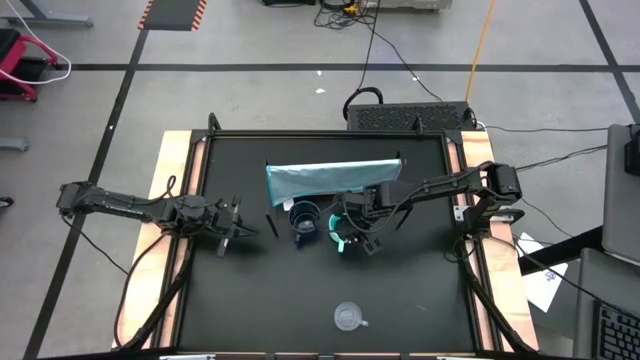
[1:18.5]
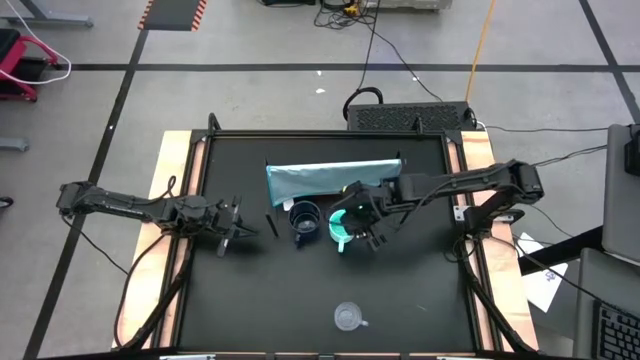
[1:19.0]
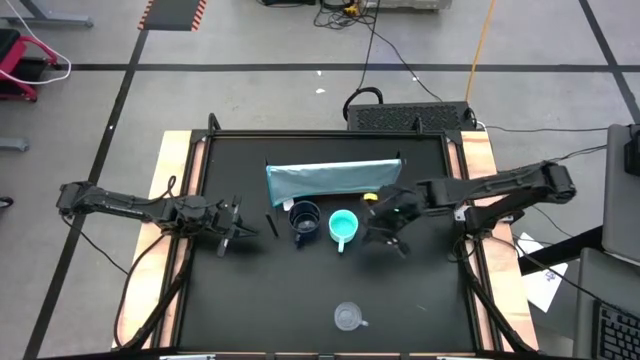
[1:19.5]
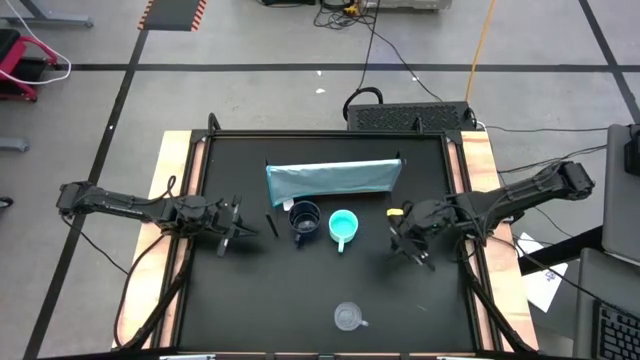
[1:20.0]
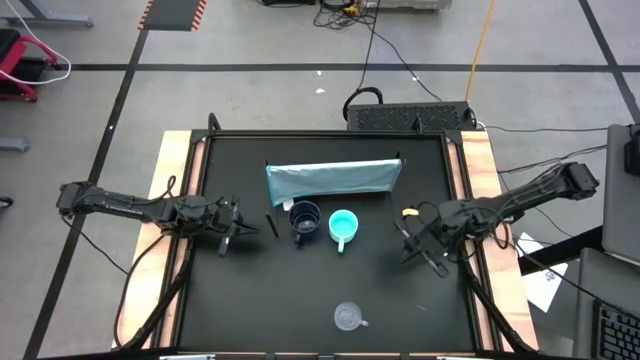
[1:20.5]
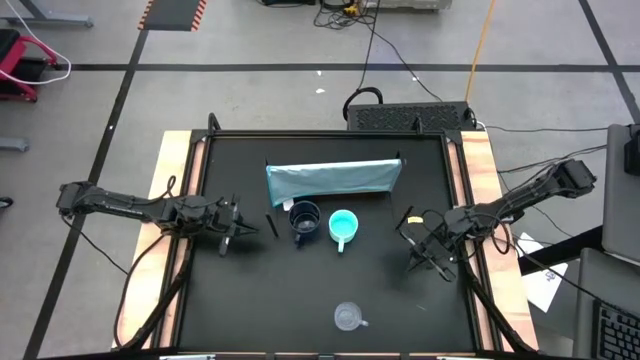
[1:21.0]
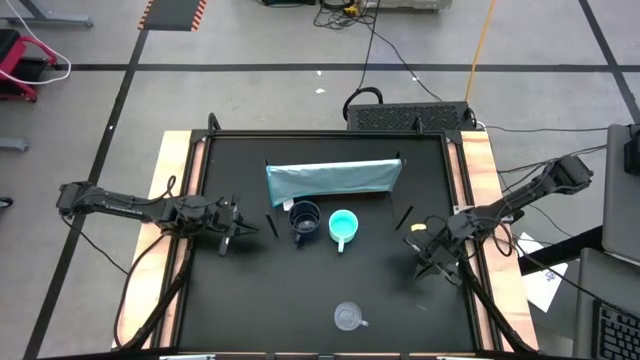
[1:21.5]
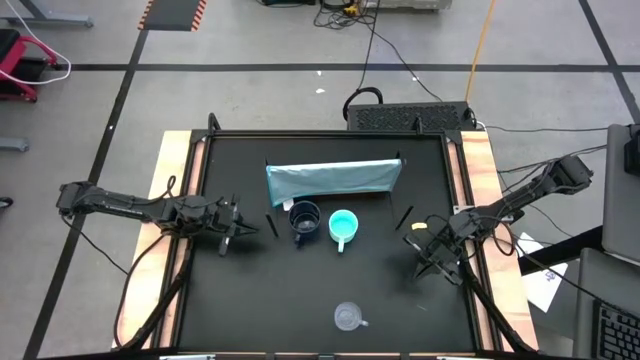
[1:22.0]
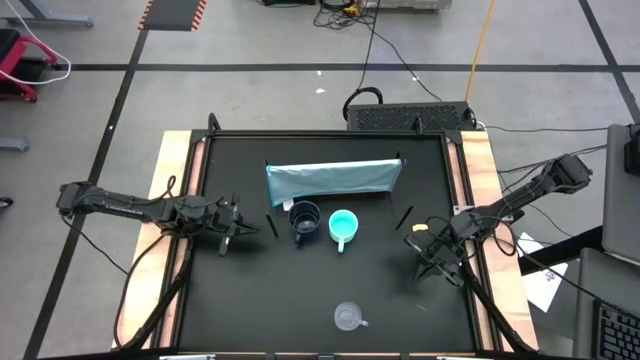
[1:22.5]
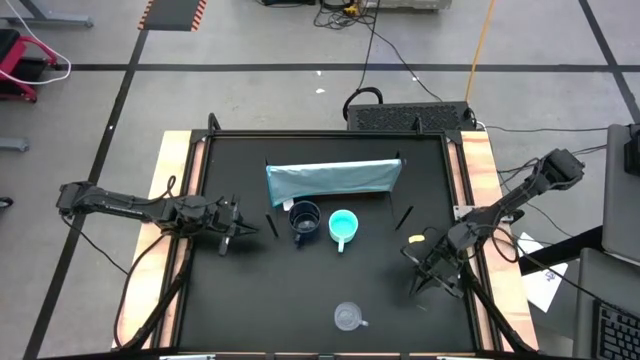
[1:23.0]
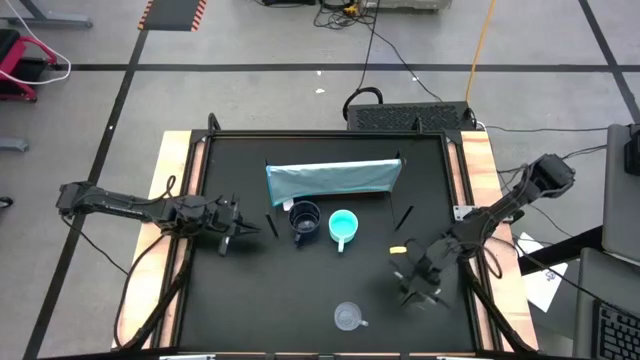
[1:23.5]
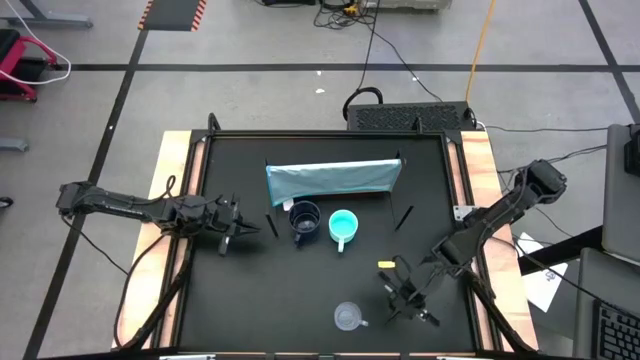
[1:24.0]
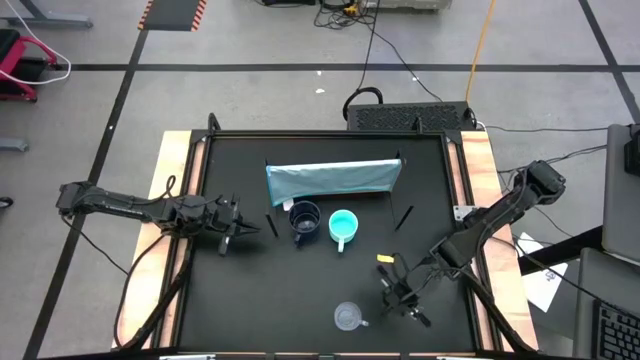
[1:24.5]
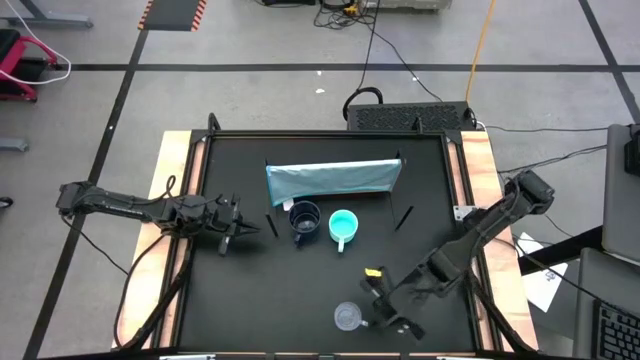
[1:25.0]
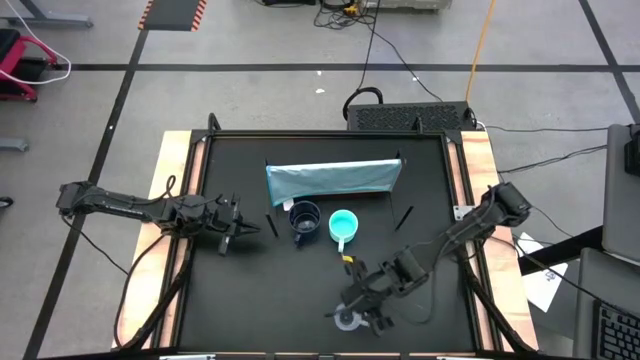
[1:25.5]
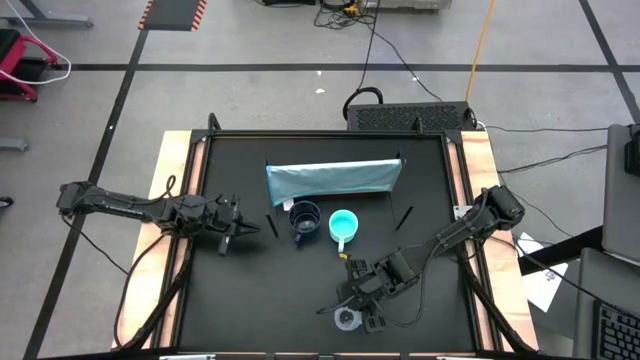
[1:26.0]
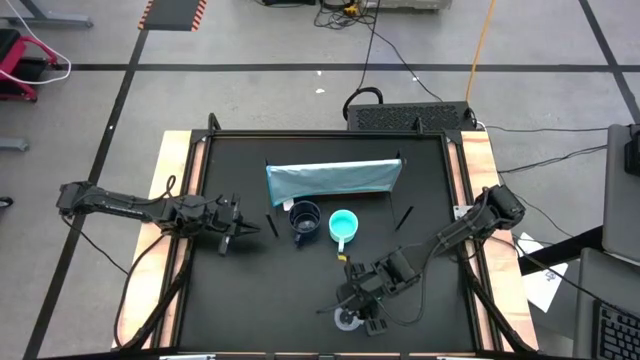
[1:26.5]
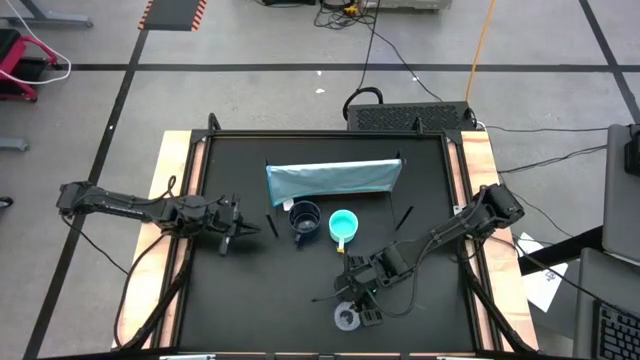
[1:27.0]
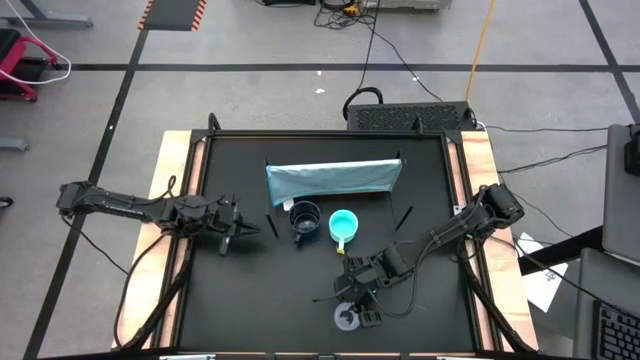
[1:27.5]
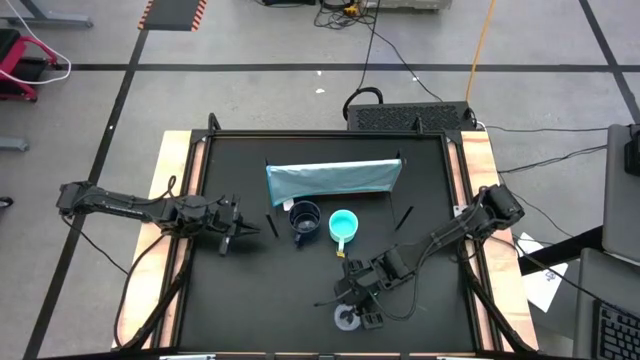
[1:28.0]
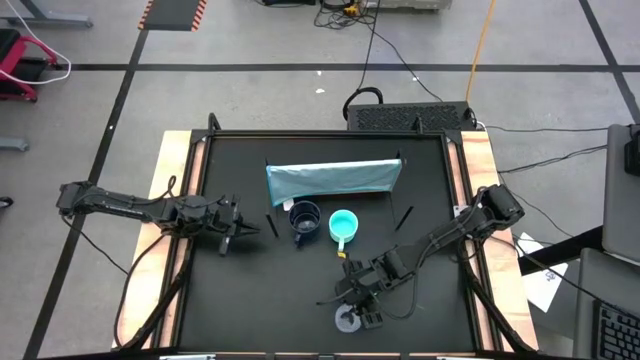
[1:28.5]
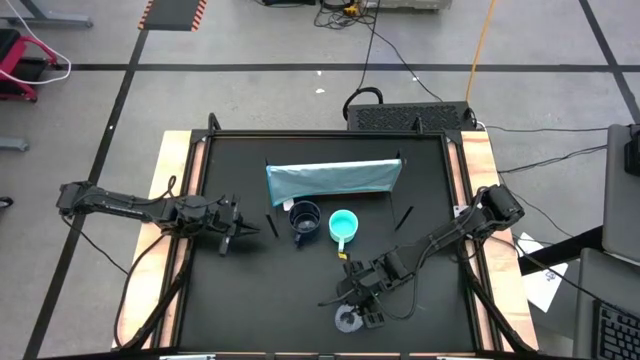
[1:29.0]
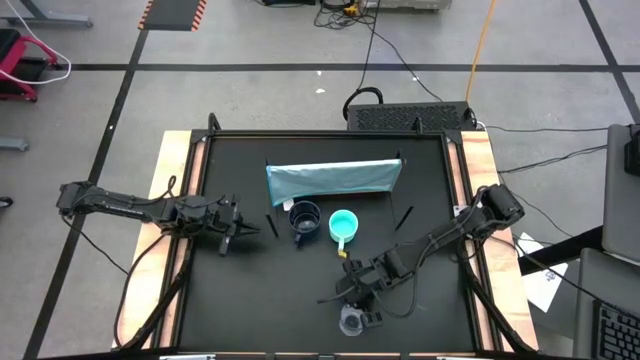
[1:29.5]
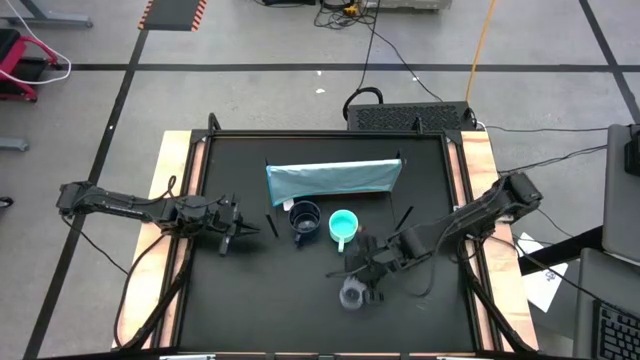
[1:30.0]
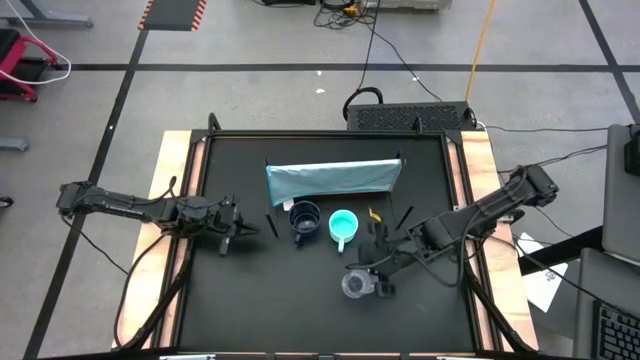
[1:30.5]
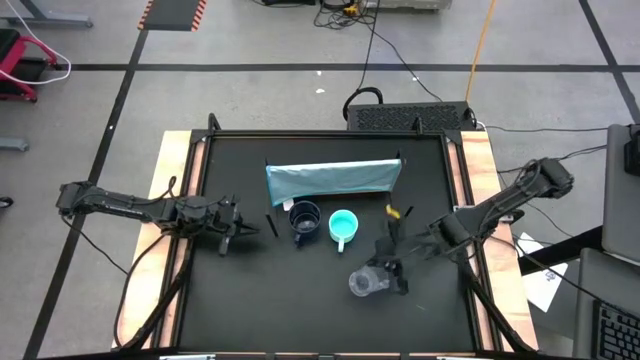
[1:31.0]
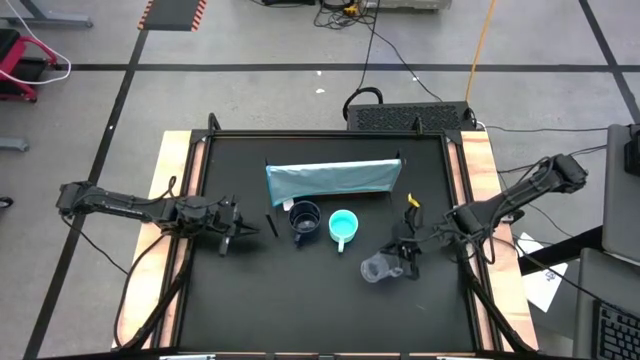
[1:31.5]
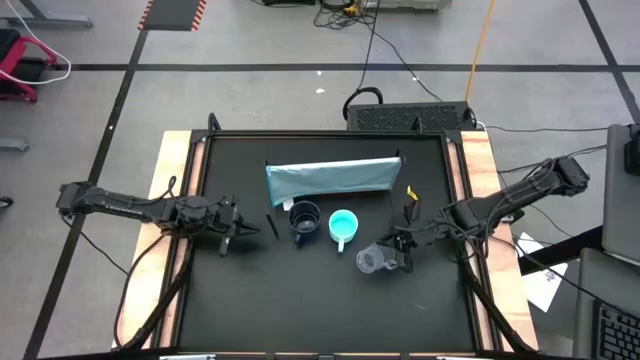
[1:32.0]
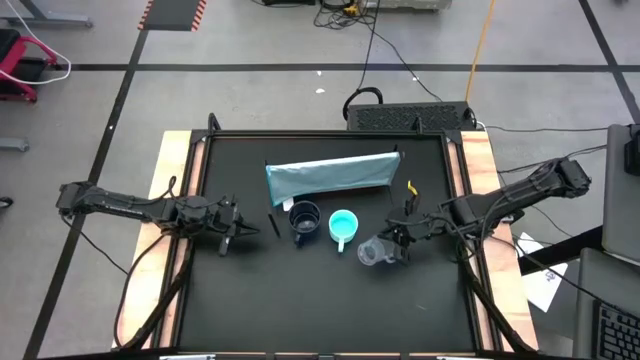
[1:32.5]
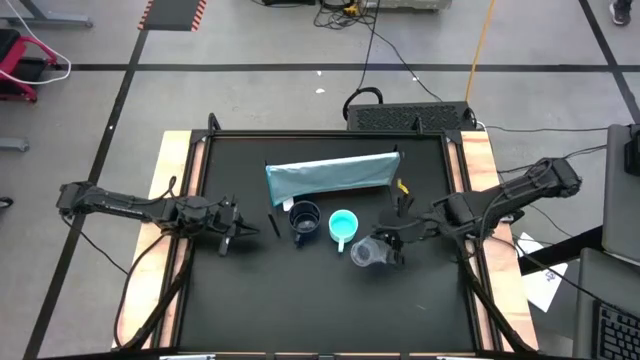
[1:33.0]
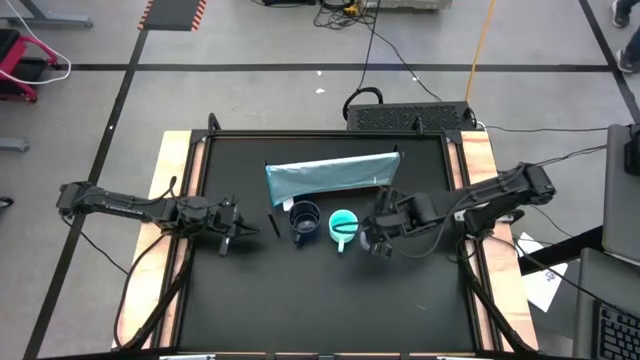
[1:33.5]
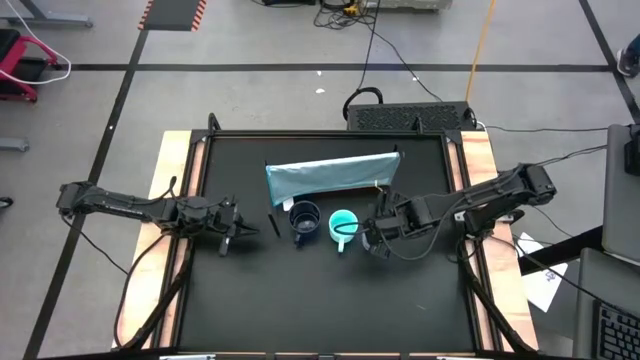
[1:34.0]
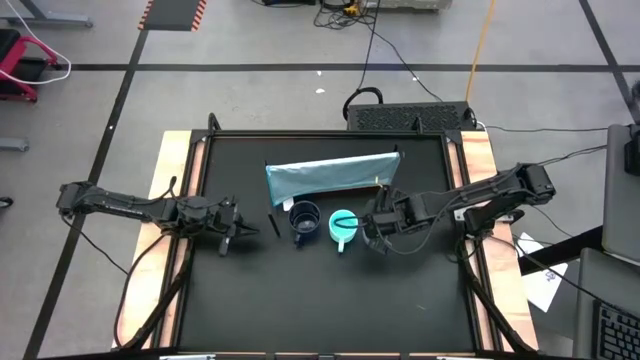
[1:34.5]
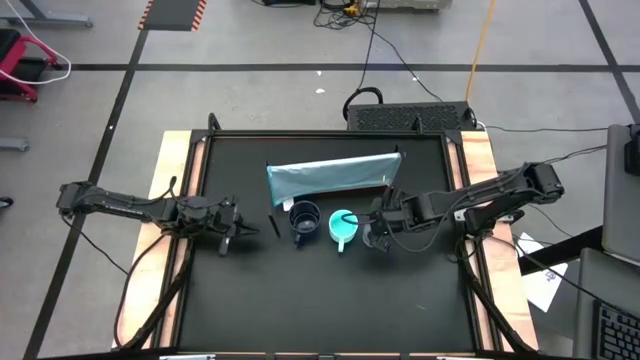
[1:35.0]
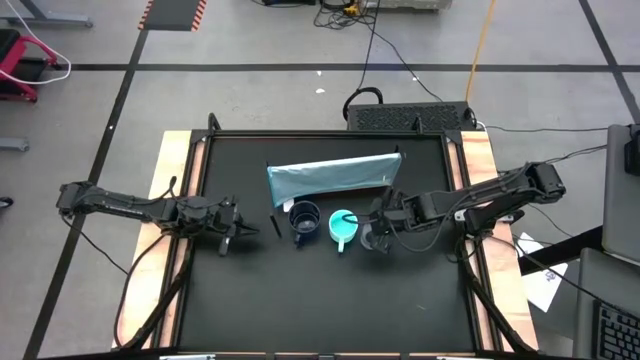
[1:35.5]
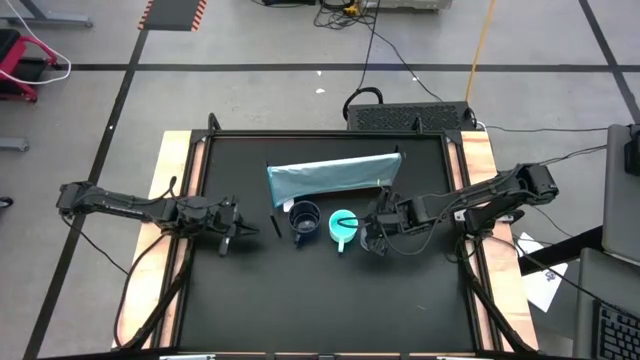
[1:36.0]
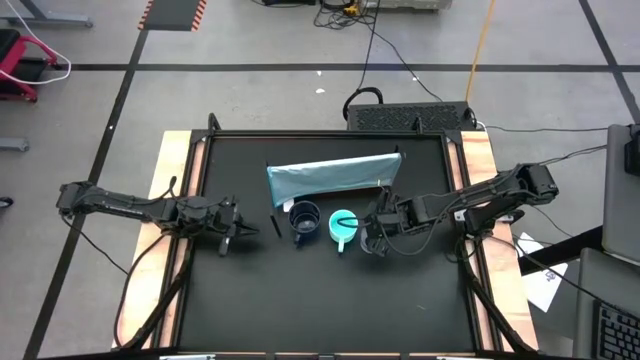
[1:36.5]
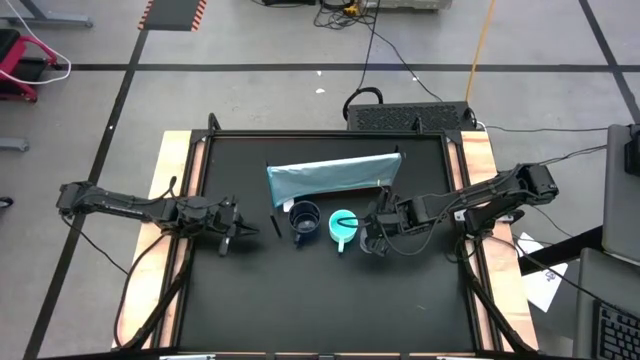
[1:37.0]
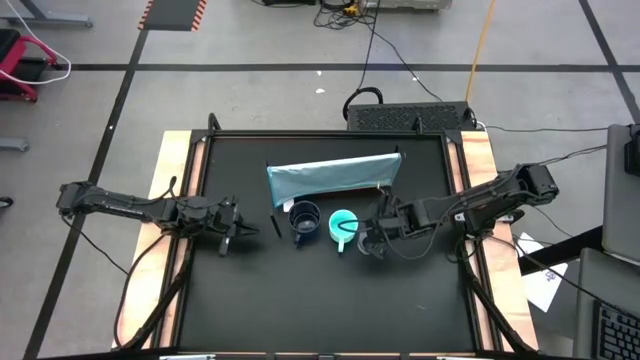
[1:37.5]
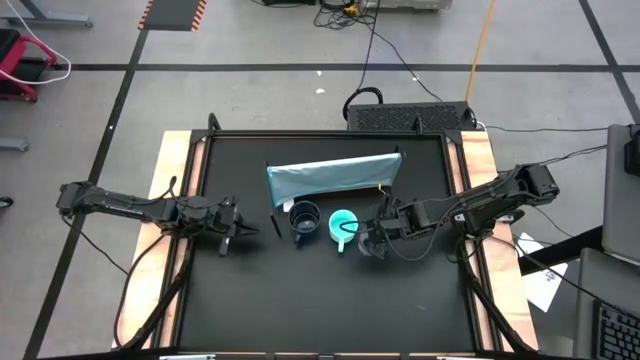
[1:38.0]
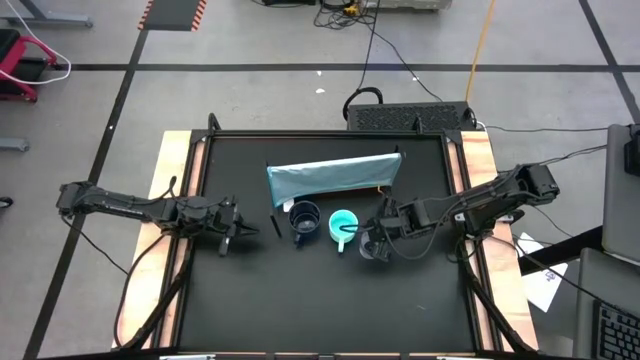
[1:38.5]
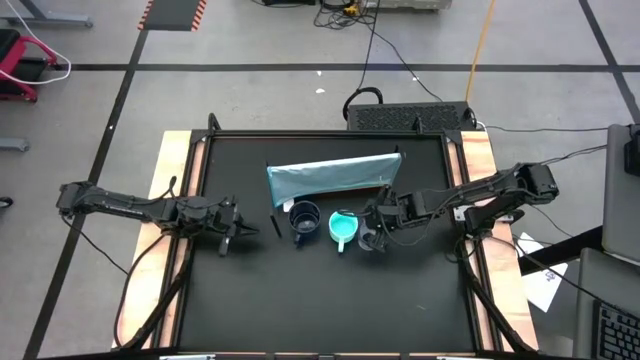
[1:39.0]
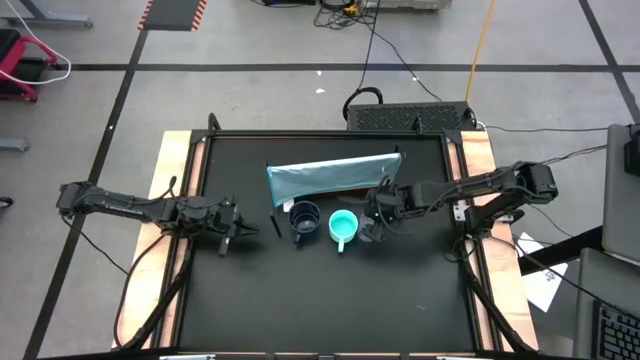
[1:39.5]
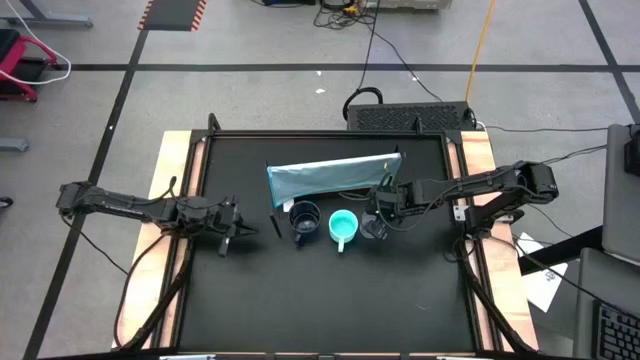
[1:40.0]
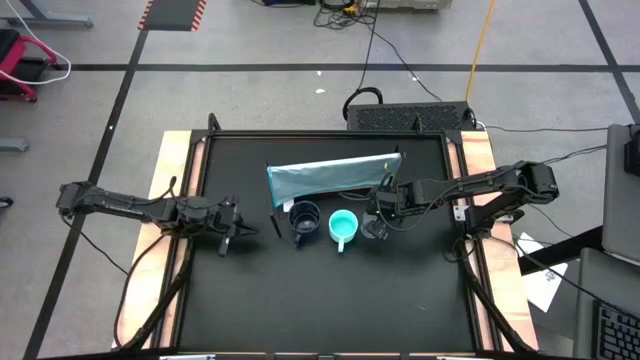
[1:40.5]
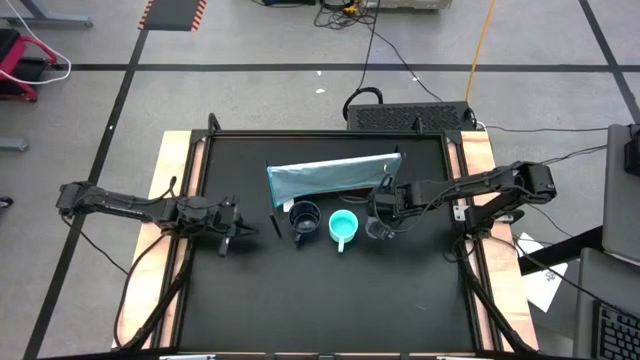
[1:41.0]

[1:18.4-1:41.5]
Task: Stack small to large cups/mugs on shelf
Move the transparent mug to the center of the table
